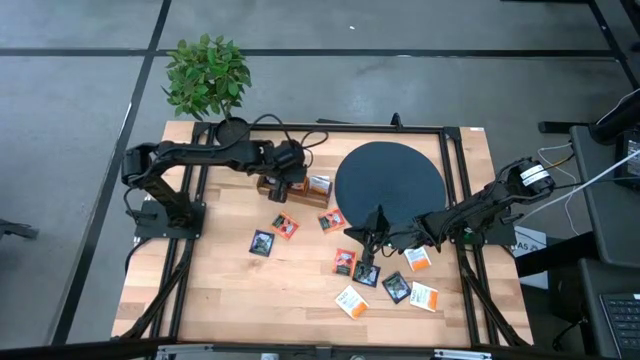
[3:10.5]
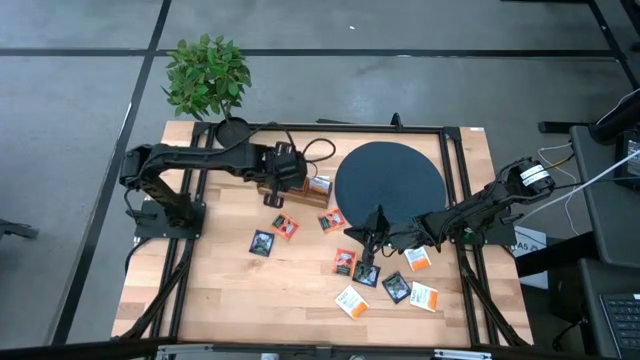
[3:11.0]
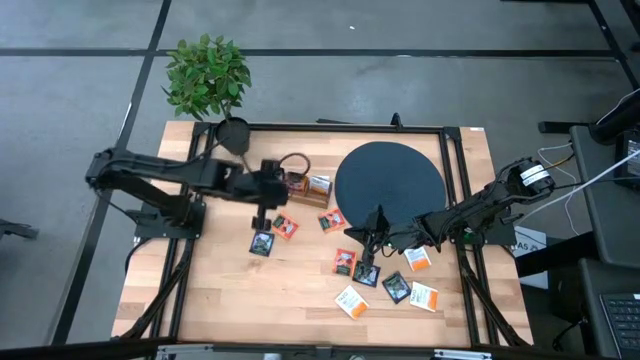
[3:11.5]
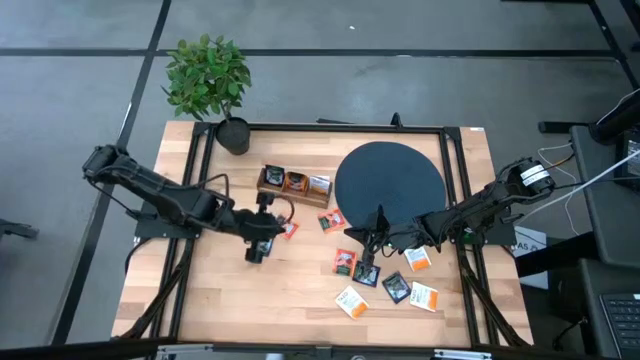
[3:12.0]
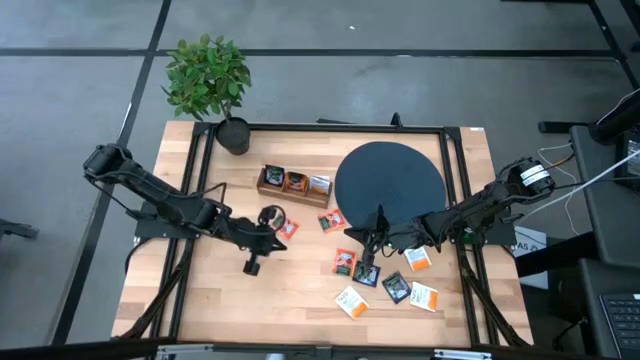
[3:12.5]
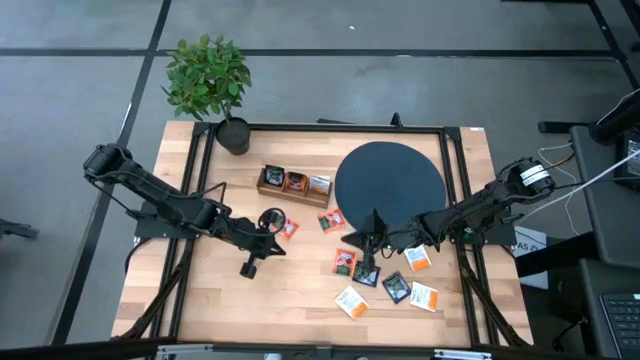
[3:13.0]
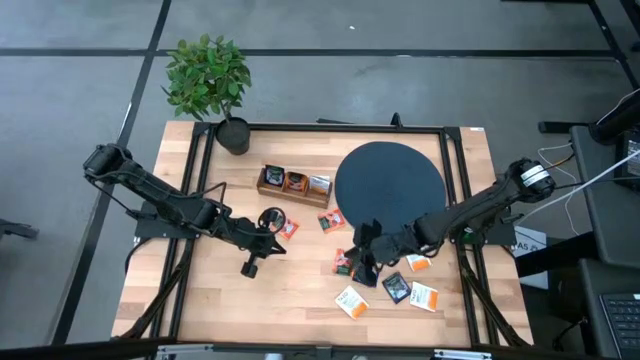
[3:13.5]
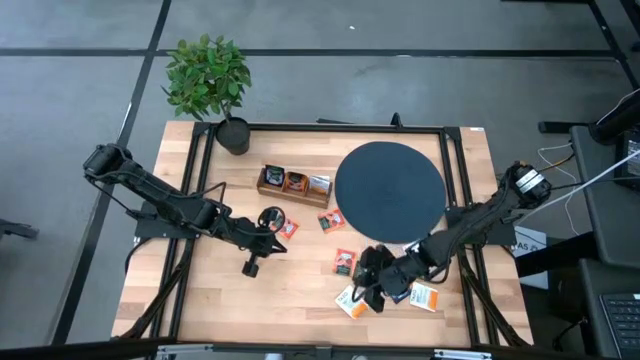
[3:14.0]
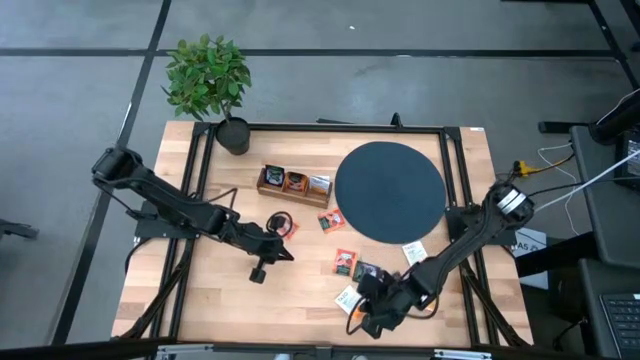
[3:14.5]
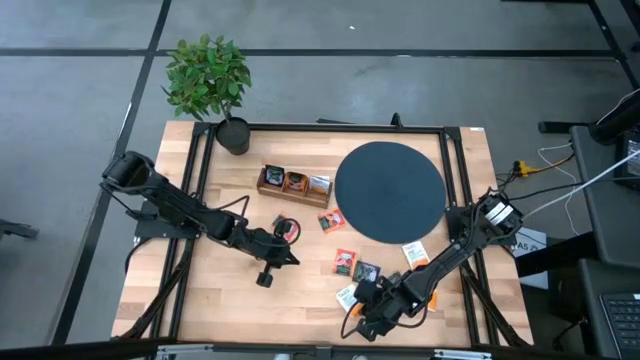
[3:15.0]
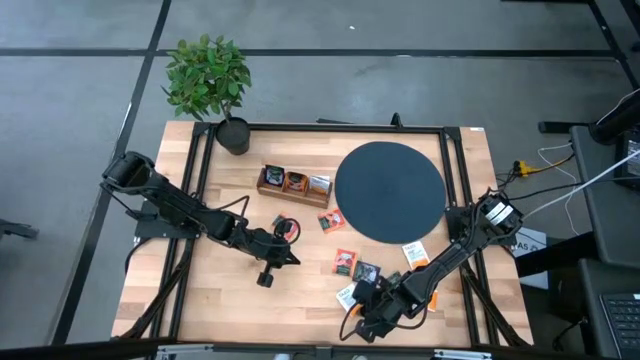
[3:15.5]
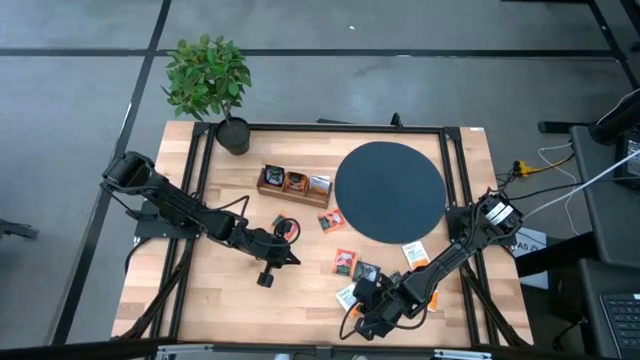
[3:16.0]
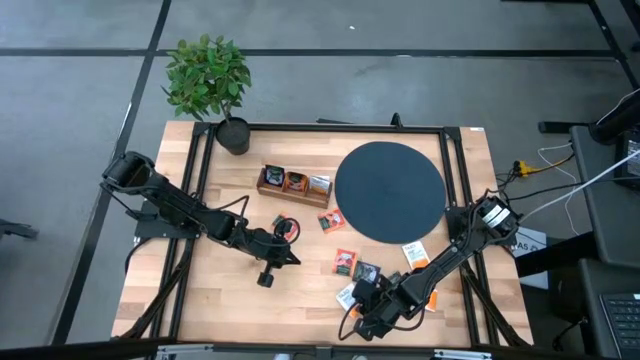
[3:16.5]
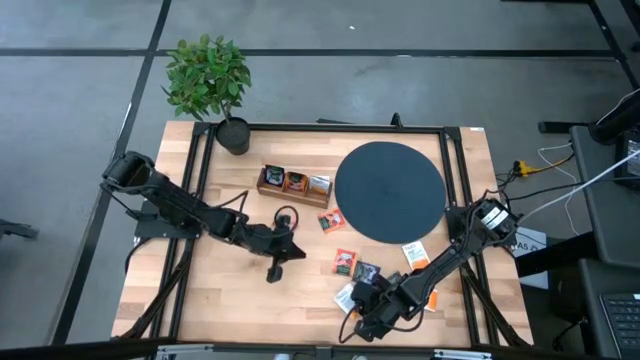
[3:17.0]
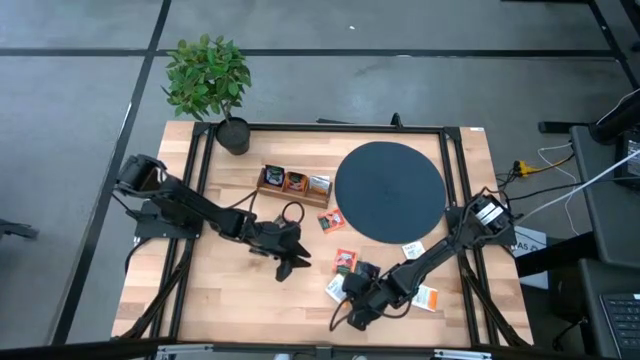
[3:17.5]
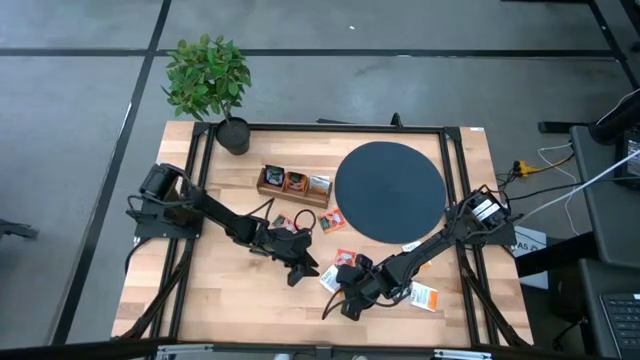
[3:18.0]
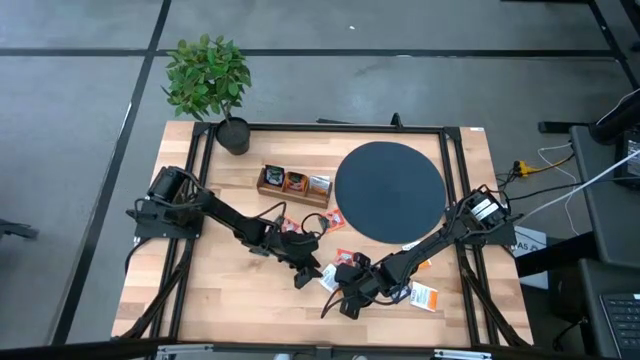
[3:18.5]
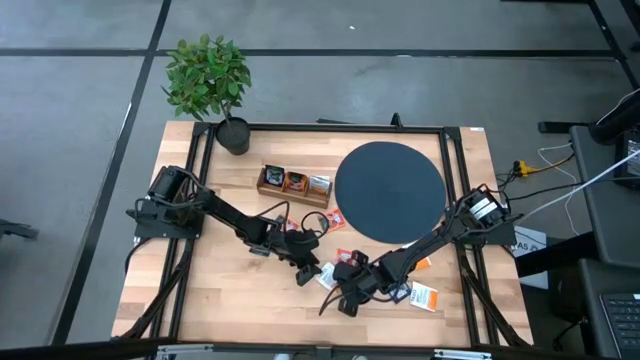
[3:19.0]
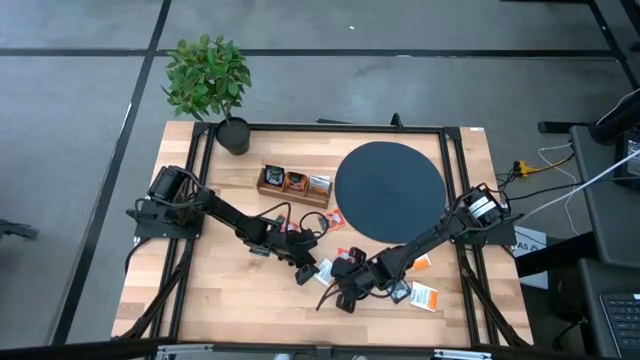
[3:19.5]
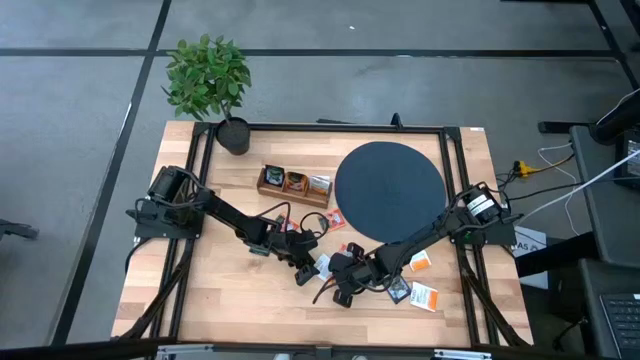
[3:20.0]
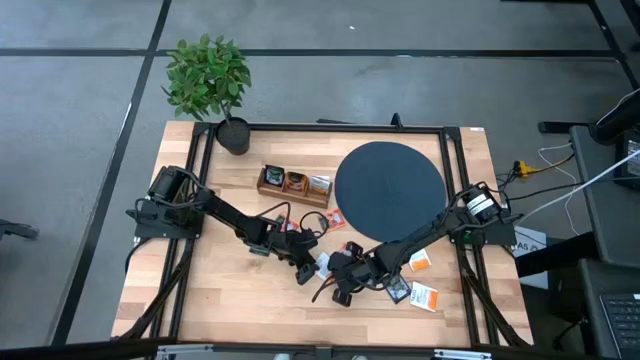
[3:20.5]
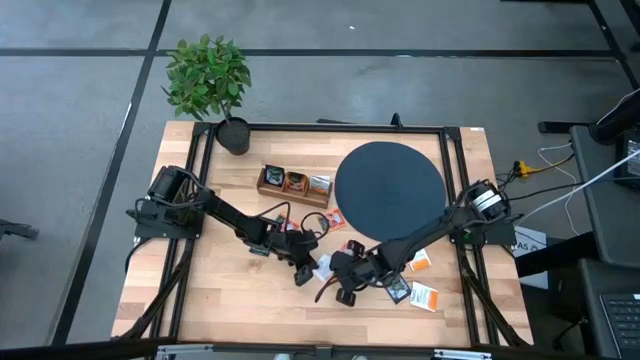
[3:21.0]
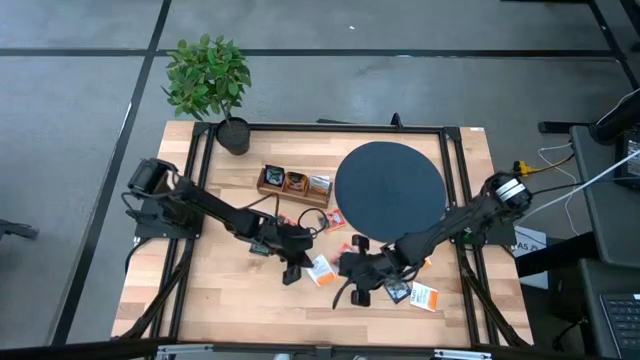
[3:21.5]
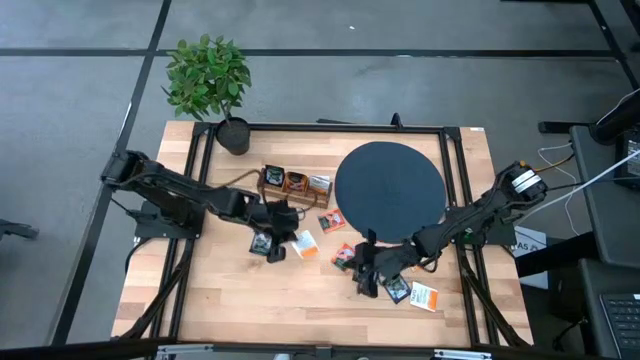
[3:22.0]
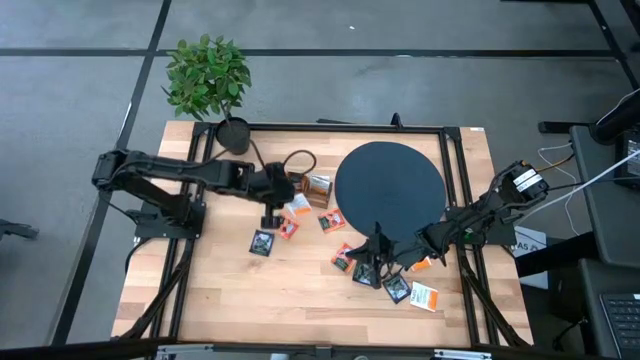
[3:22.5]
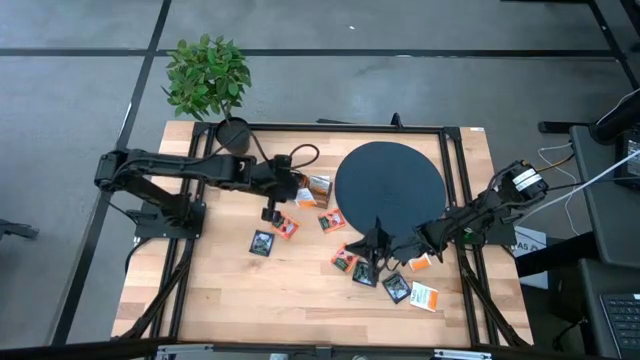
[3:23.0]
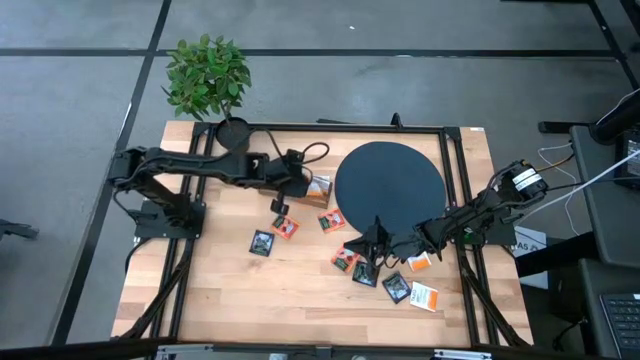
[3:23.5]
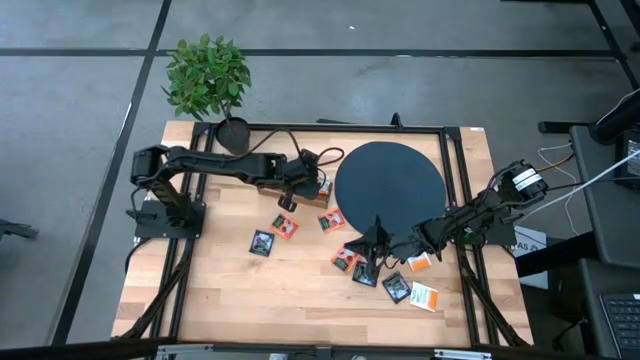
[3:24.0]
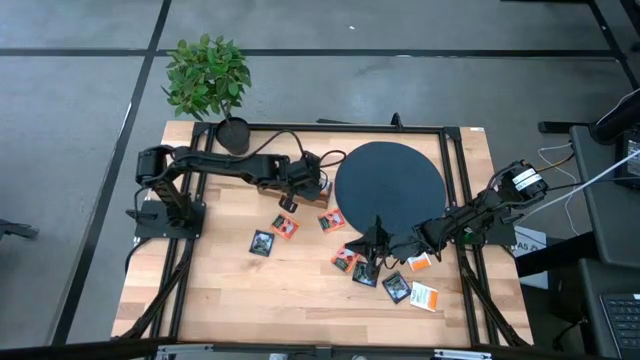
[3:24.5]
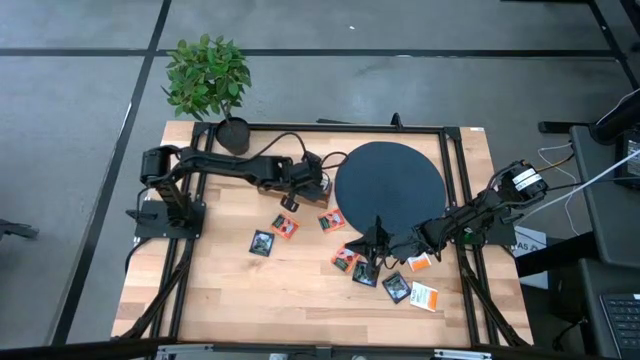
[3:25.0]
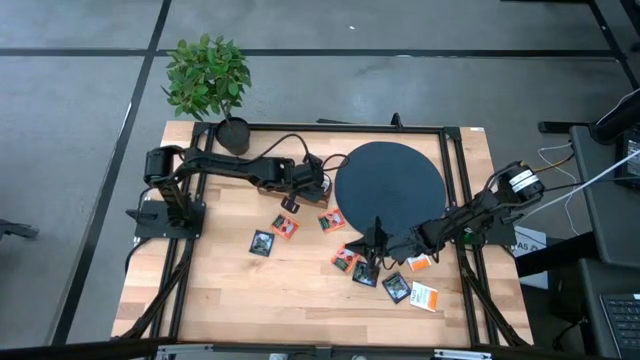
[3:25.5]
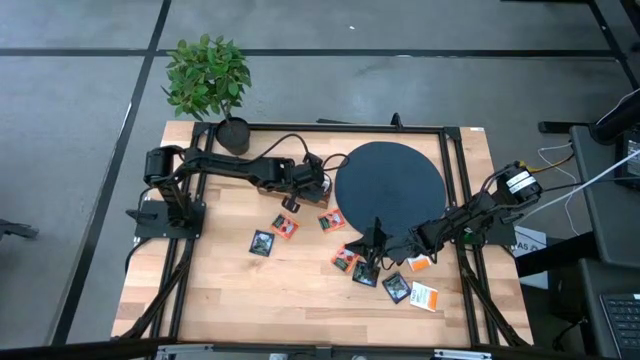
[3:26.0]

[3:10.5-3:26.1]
Task: Pick & Place Tea
Put the left white tea bag into the right section of the wooden organizer

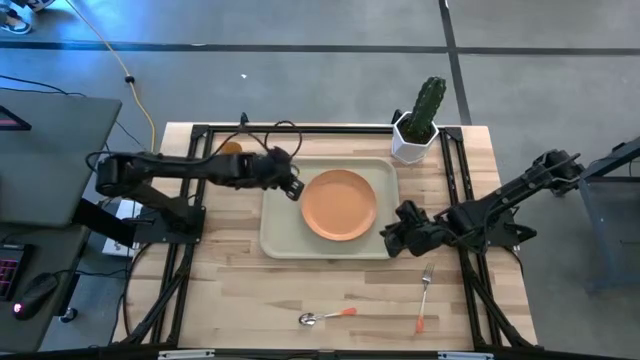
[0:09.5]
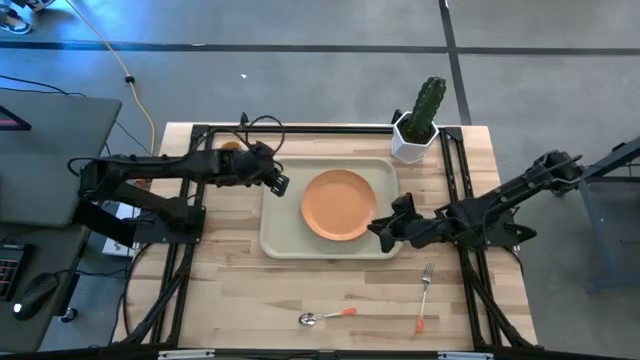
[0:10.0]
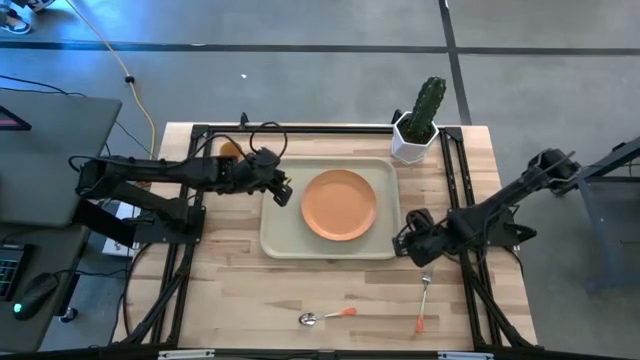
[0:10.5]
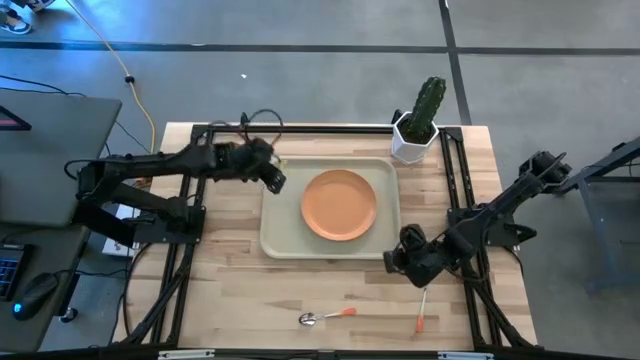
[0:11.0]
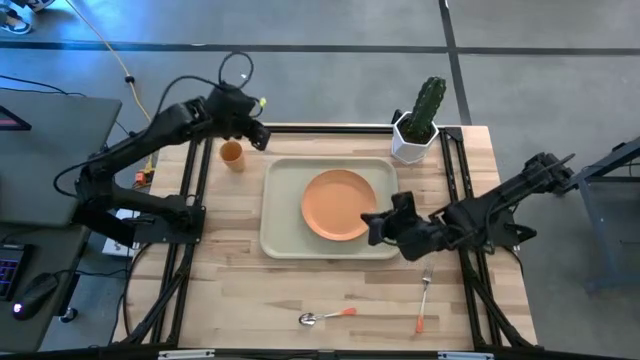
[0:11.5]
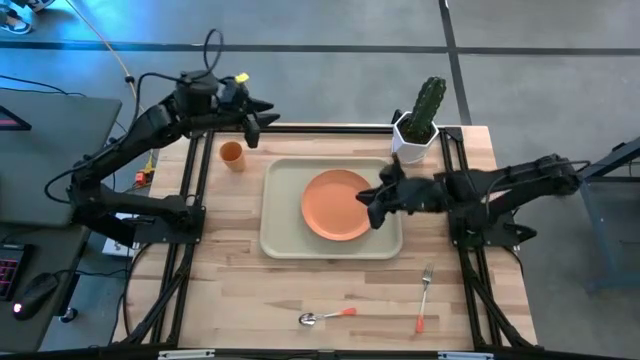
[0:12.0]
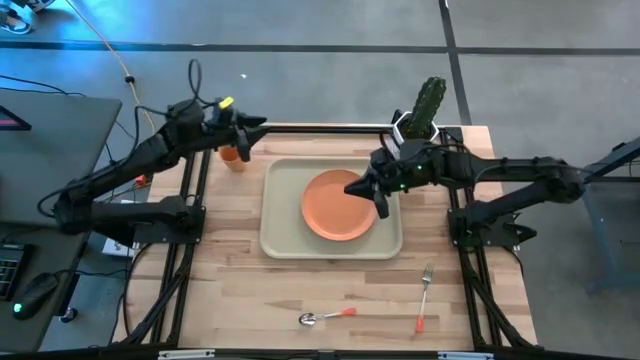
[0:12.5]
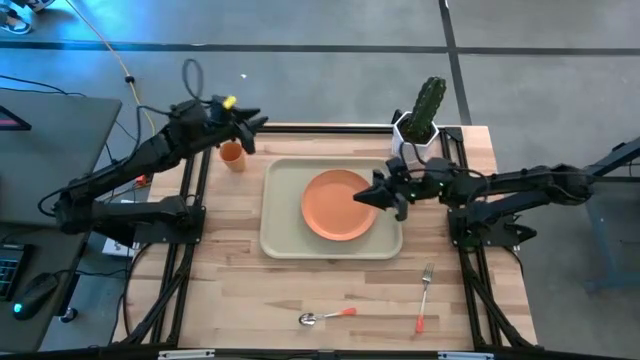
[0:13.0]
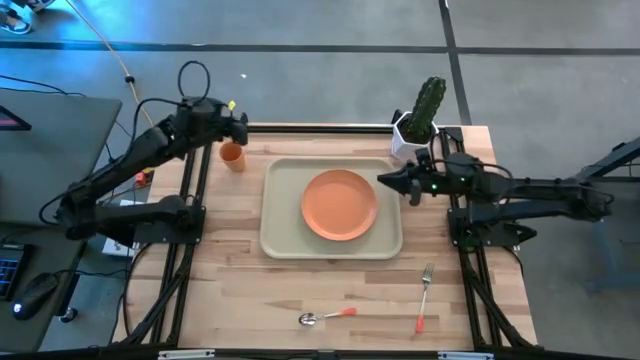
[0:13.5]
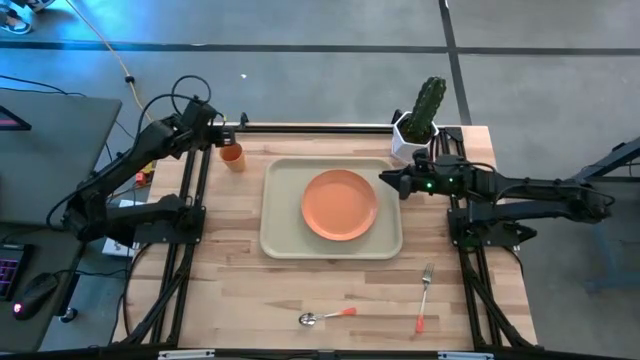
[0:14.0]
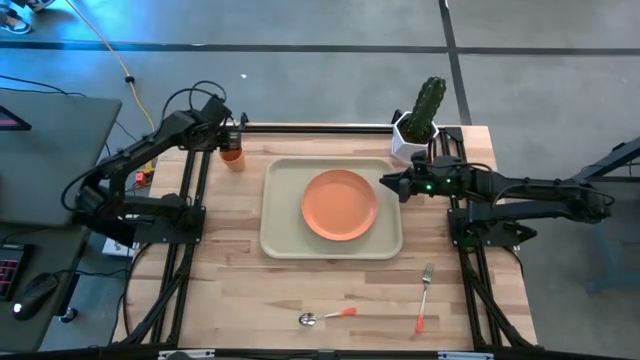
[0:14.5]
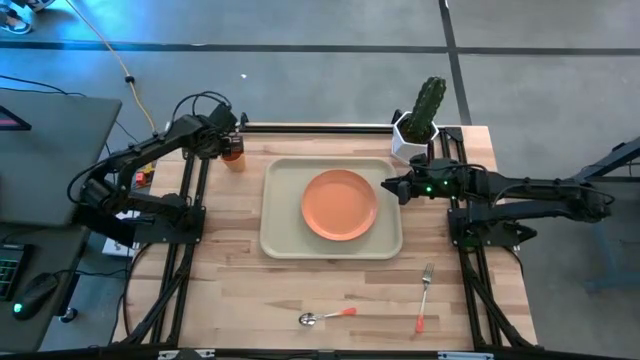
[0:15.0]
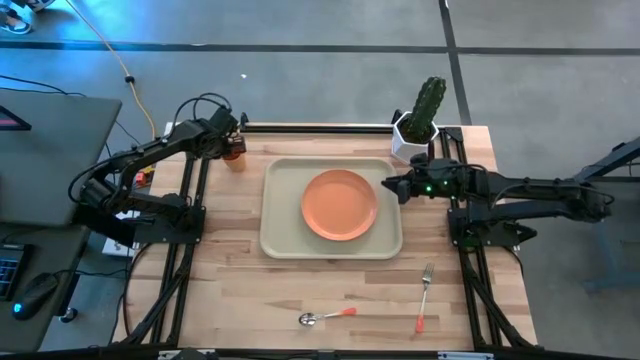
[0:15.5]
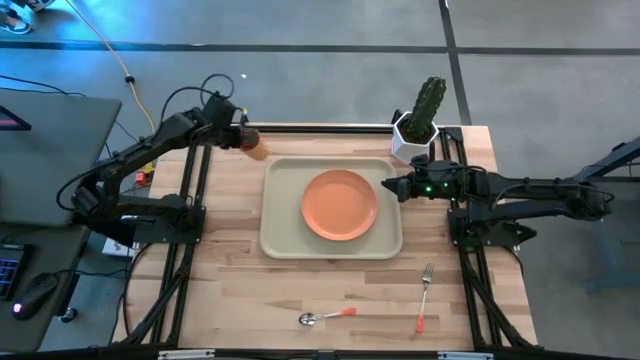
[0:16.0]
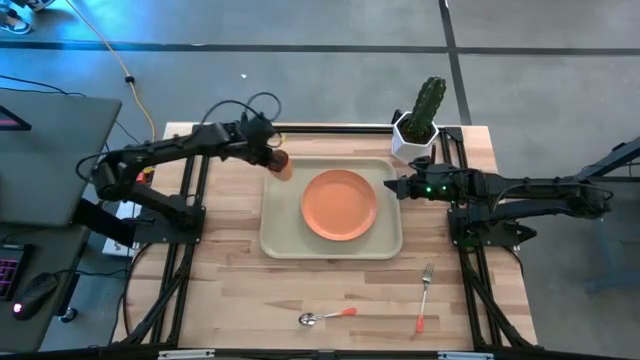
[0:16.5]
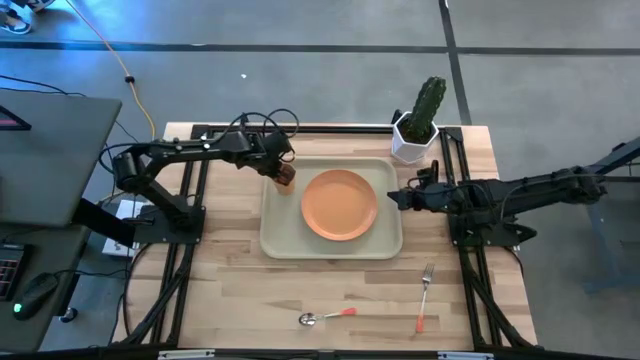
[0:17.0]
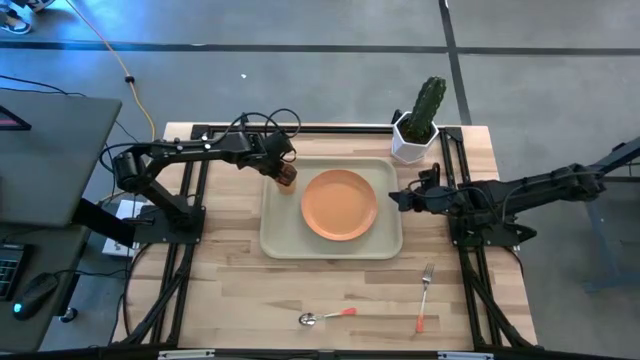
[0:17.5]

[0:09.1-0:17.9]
Task: Pick and place plate/cup/fork/spoon on tray
Put the orange cup to the top left side of the light brown tray
